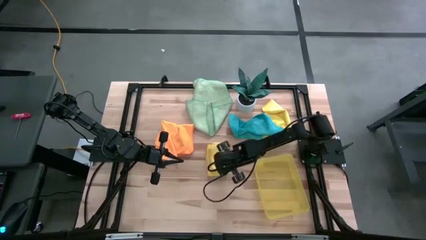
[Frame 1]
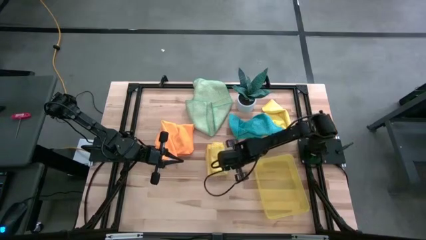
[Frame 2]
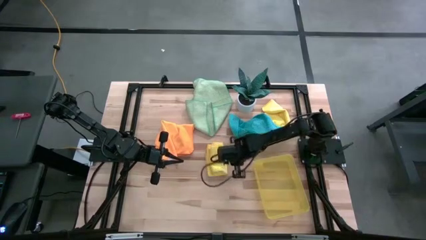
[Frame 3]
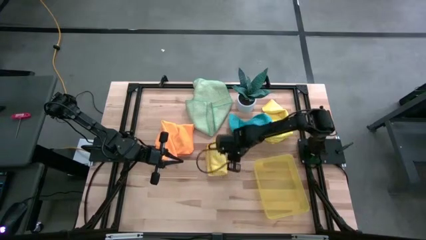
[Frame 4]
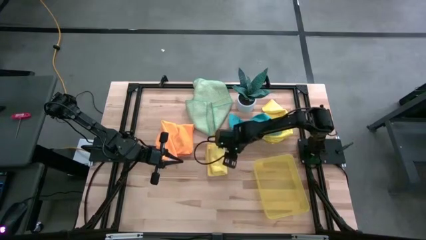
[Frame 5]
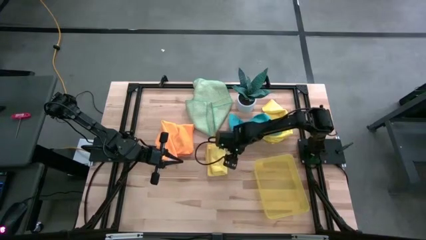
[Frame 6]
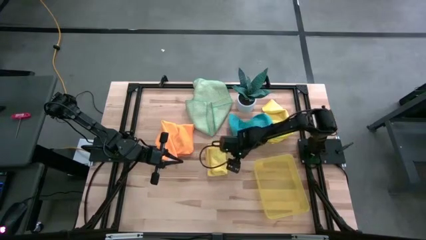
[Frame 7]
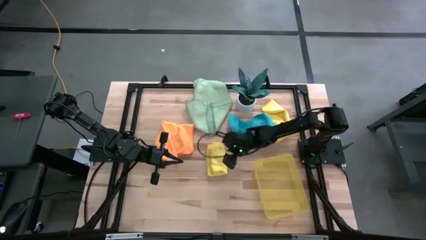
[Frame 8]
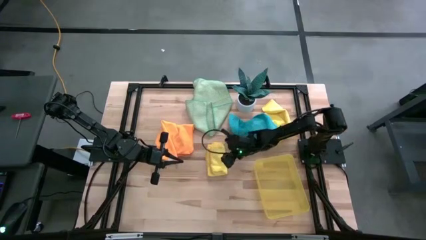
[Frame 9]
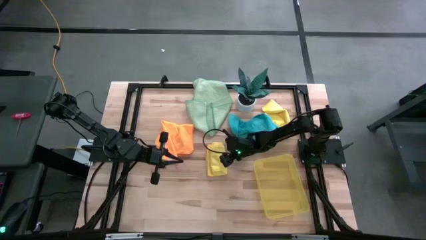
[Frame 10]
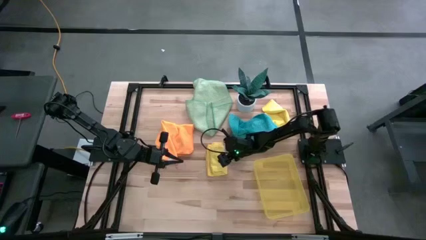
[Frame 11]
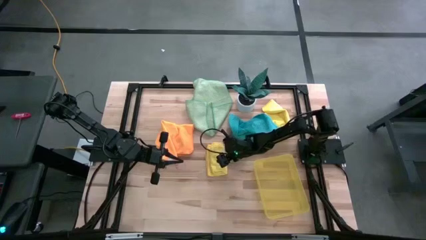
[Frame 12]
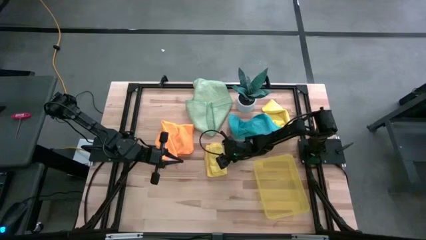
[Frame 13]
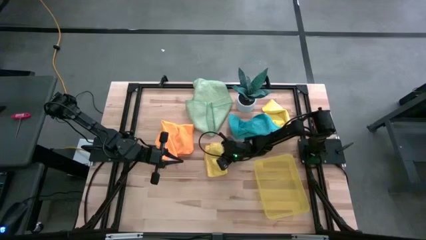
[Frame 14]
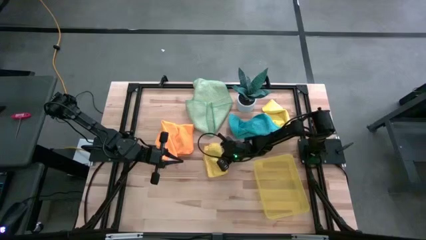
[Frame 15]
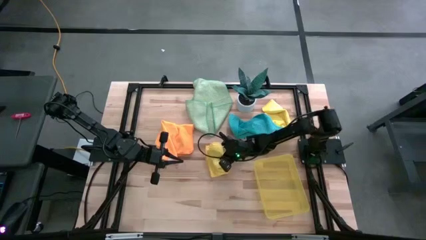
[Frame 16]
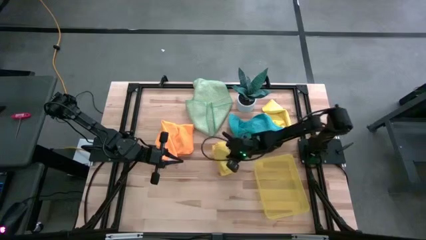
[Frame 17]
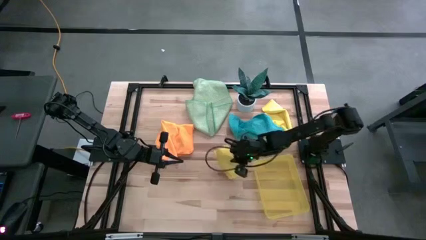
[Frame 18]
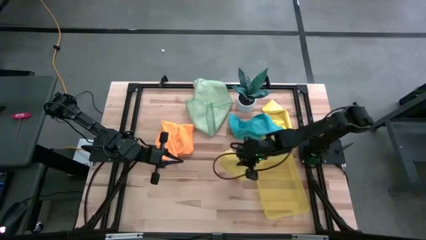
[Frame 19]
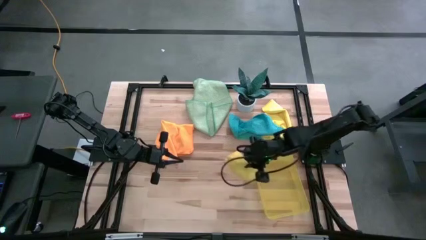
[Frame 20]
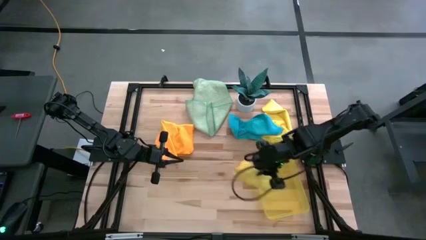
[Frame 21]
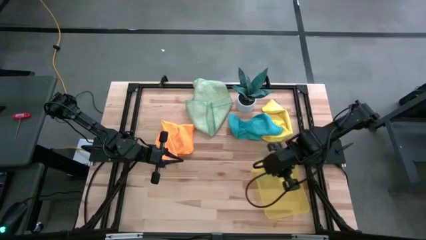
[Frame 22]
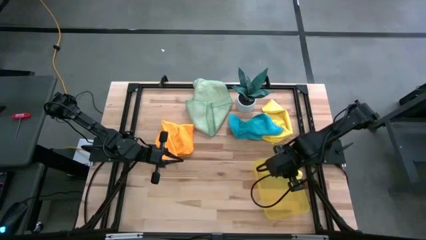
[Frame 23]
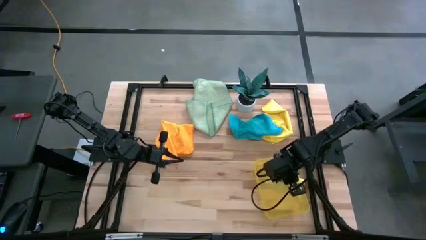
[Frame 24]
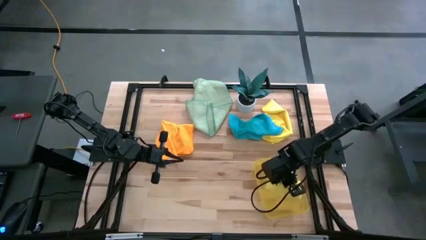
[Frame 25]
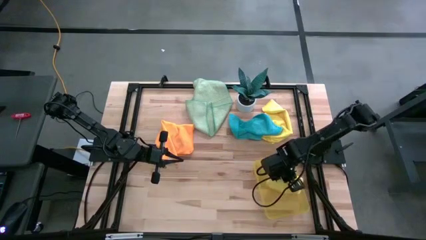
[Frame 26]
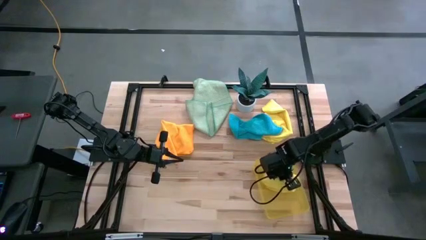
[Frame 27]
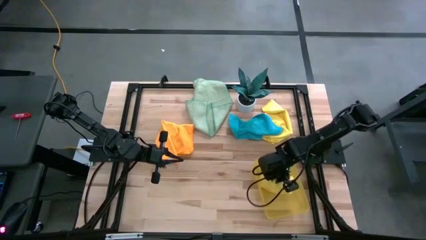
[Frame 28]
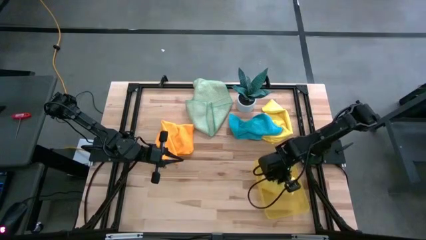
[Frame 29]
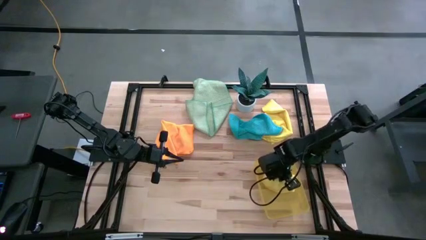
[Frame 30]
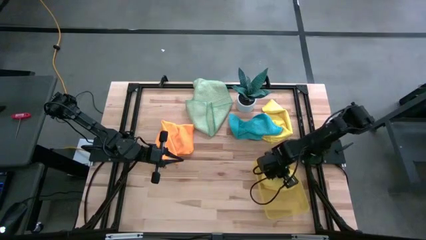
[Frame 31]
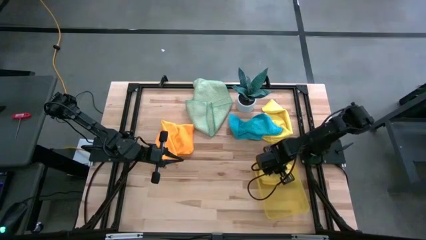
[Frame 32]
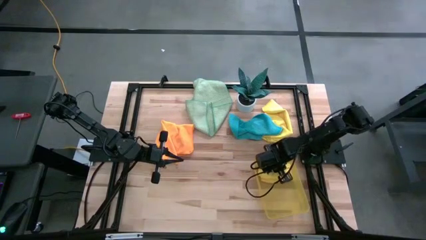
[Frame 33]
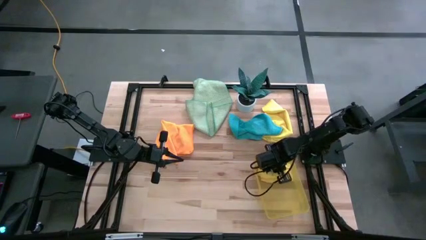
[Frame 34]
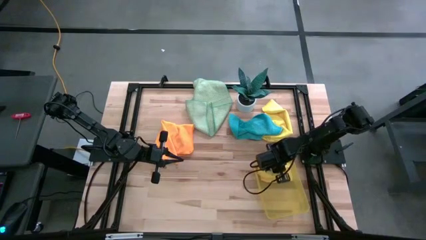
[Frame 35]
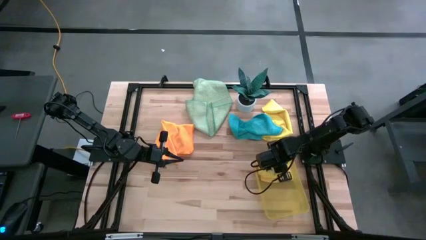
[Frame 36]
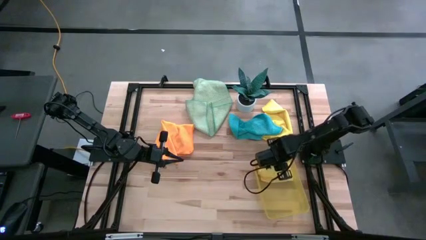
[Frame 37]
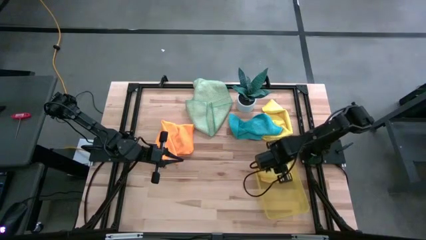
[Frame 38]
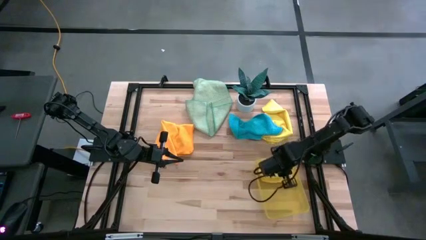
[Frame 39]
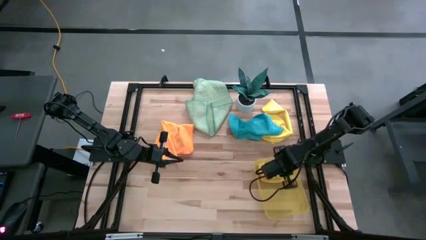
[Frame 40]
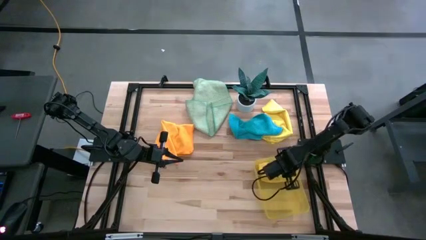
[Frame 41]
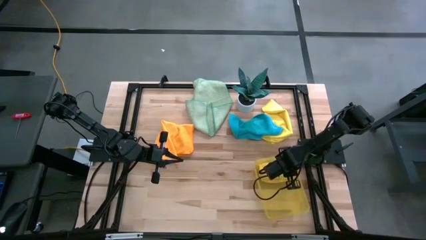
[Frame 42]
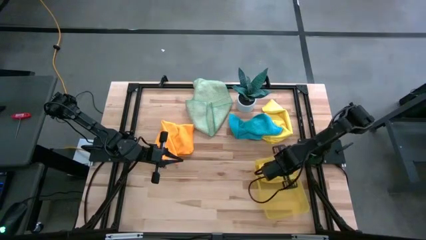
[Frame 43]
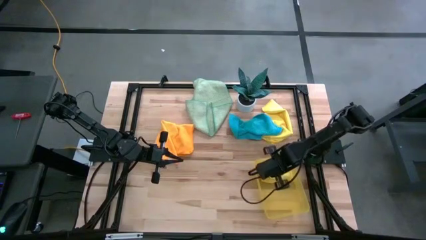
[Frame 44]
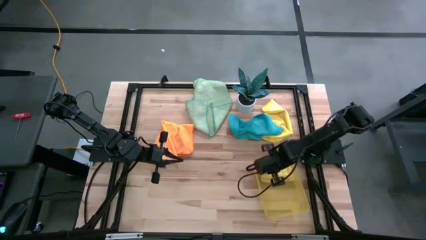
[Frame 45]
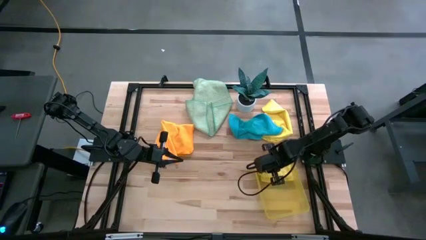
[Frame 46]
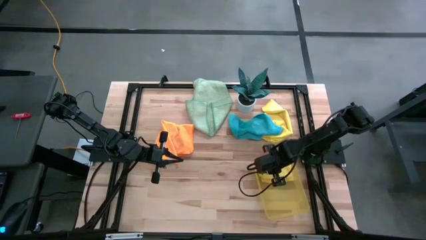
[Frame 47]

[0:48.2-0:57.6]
Task: Fold microfiber towels
Put the left yellow microfiber cloth into the yellow bin

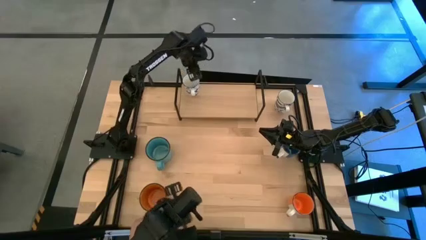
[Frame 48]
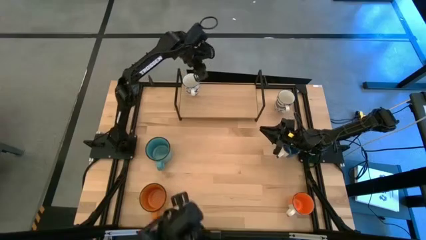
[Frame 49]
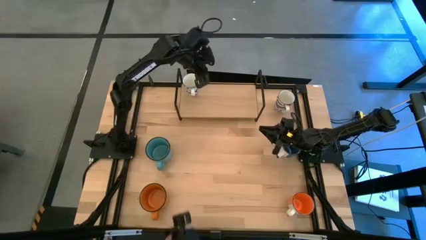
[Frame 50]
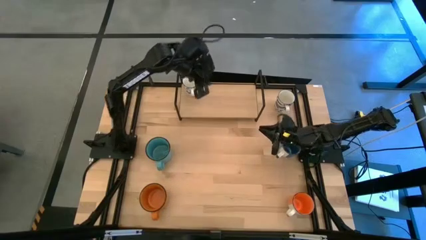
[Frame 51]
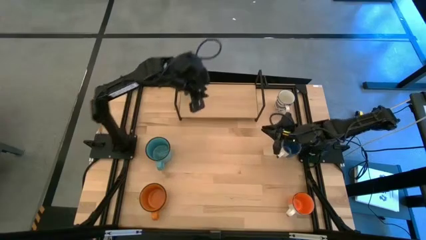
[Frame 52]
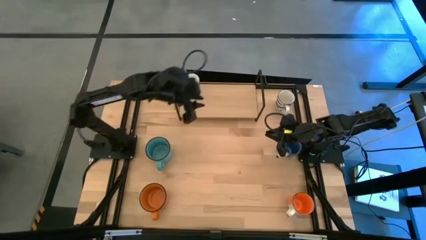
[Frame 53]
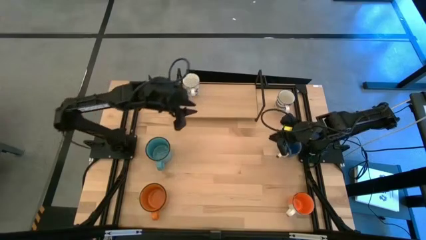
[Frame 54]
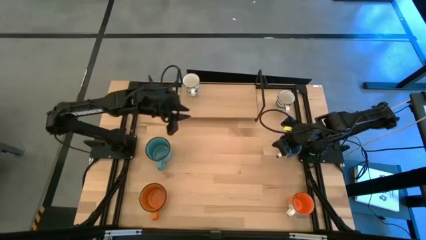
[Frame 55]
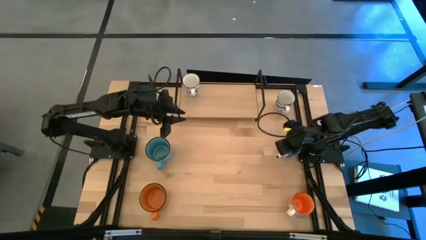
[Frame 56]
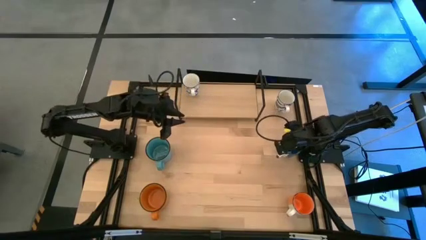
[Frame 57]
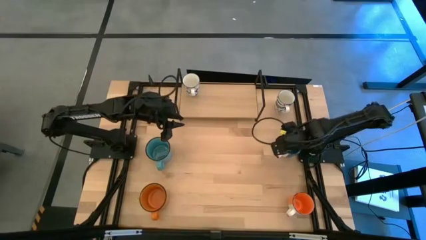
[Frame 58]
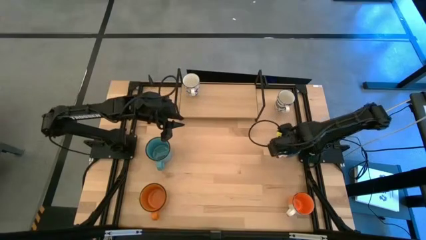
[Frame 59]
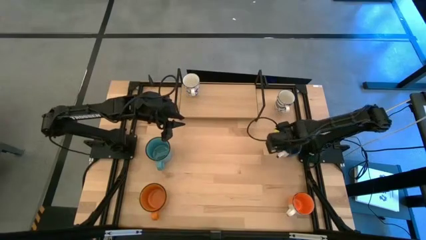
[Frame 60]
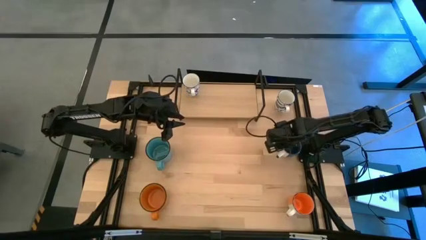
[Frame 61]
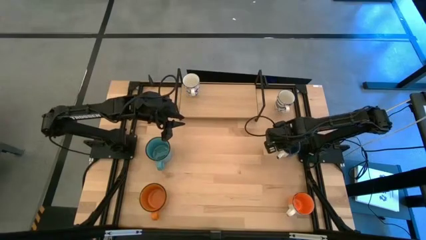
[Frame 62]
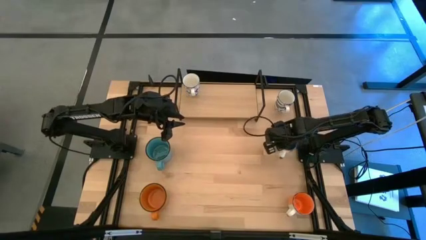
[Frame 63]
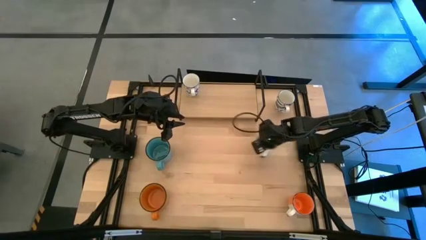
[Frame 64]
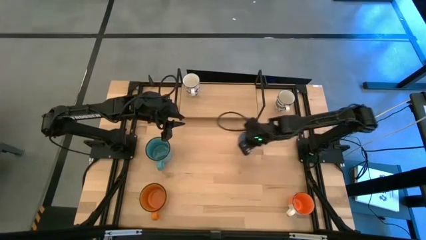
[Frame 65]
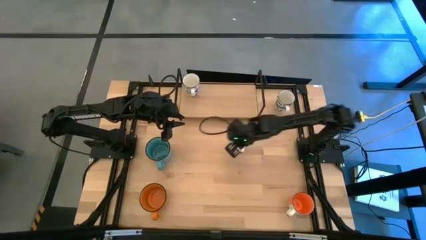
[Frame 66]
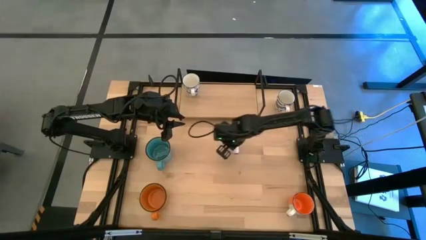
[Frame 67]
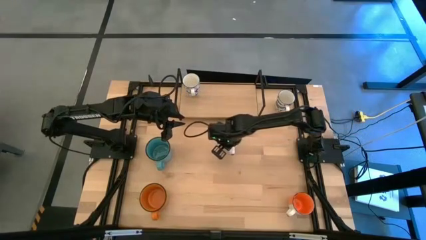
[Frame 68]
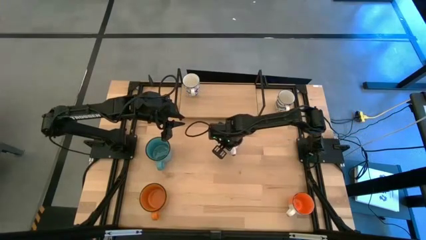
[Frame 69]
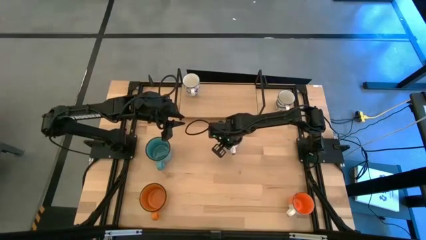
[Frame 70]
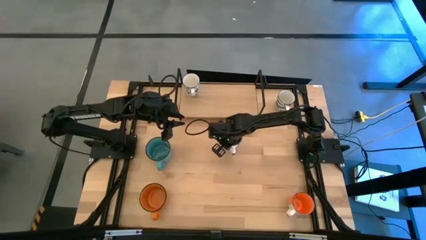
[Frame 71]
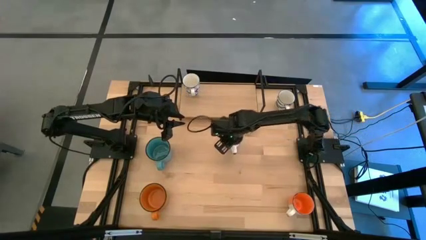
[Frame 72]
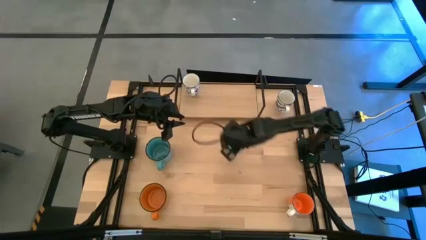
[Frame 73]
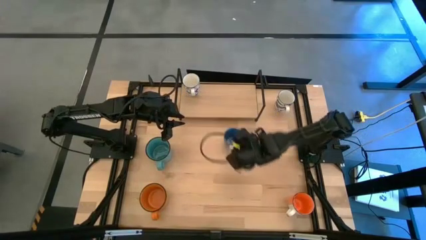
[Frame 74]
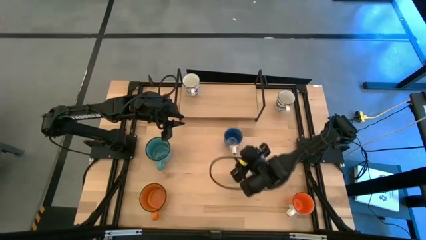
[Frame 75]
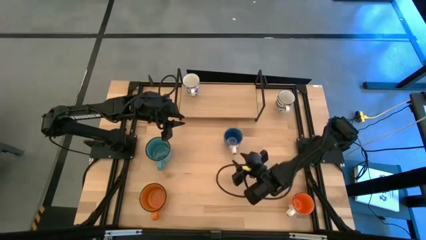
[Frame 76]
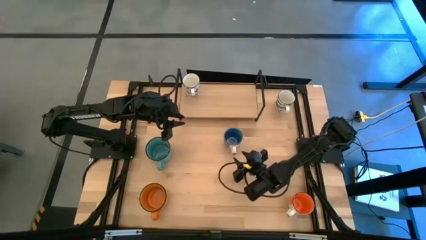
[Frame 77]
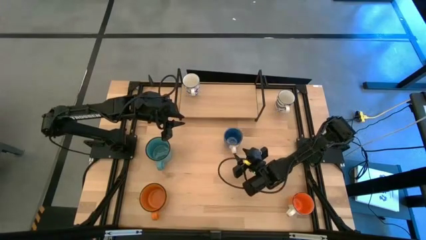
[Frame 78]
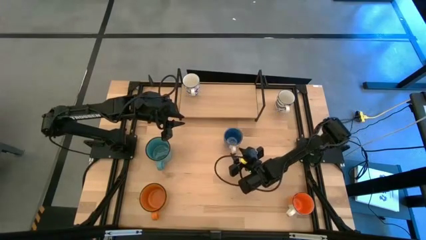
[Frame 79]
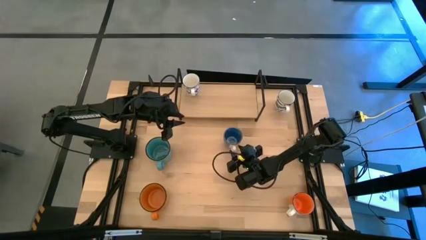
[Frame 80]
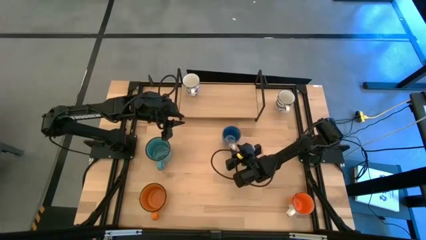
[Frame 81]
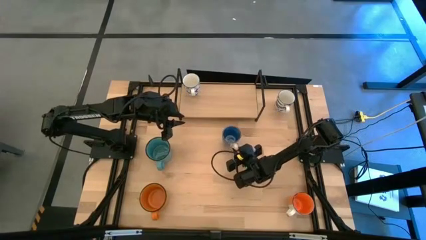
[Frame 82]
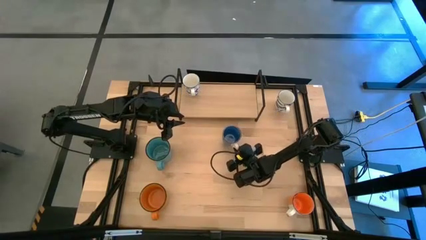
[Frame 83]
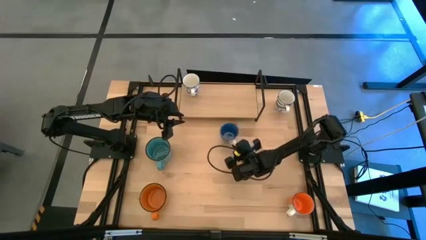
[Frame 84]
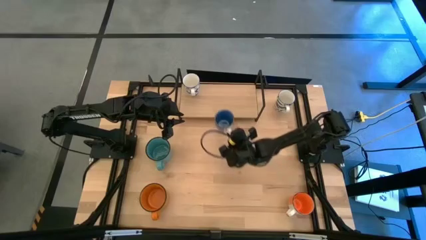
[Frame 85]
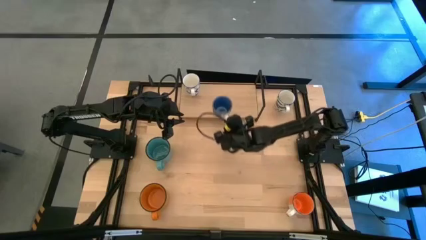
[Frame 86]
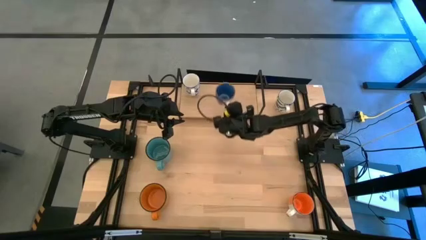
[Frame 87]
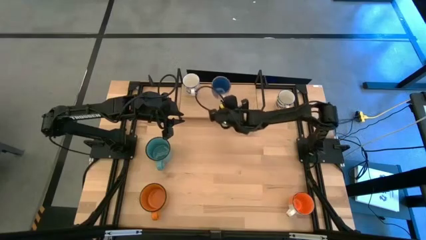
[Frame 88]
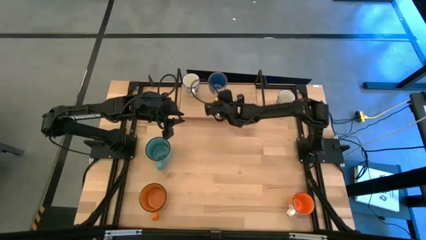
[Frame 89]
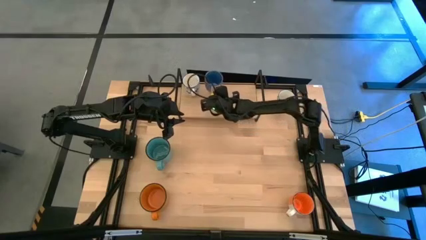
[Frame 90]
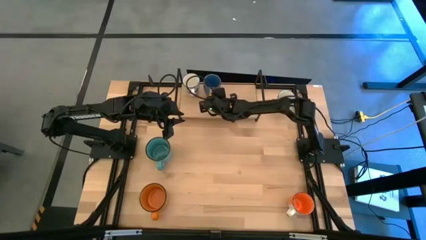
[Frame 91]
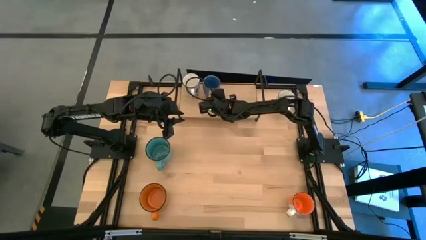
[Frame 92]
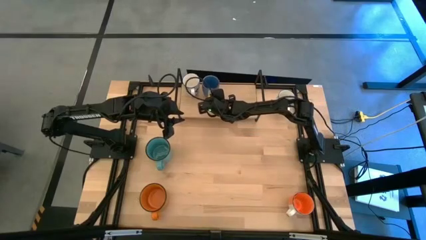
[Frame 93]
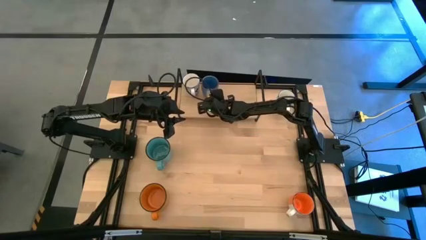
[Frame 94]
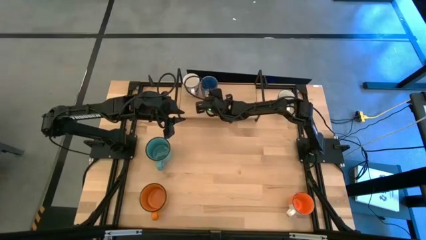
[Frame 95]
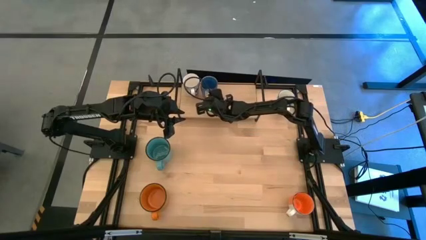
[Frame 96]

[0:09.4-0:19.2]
Task: Place coffee mugs
Put the blue mug on the shelf
